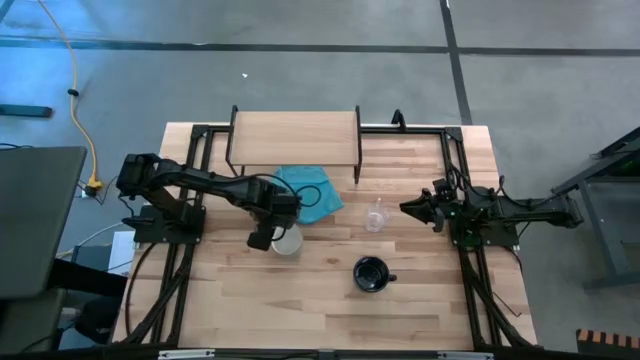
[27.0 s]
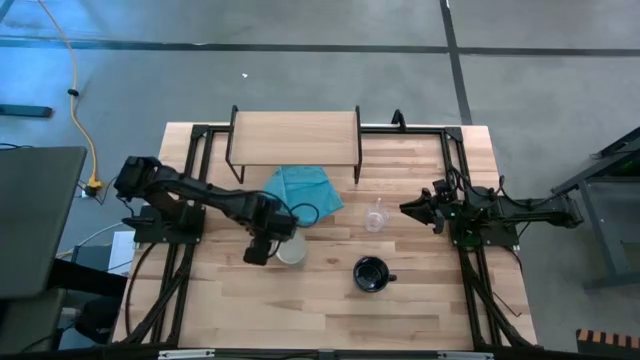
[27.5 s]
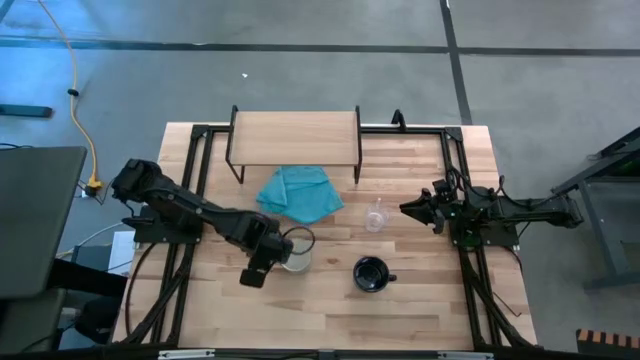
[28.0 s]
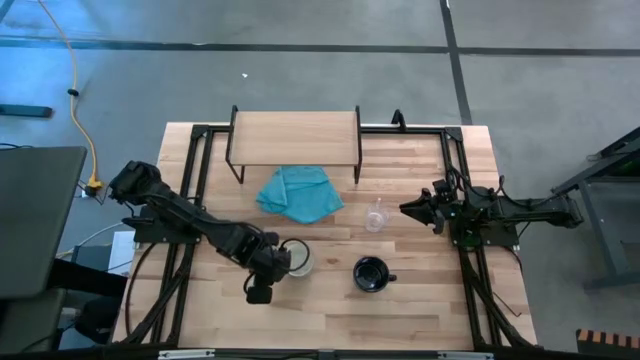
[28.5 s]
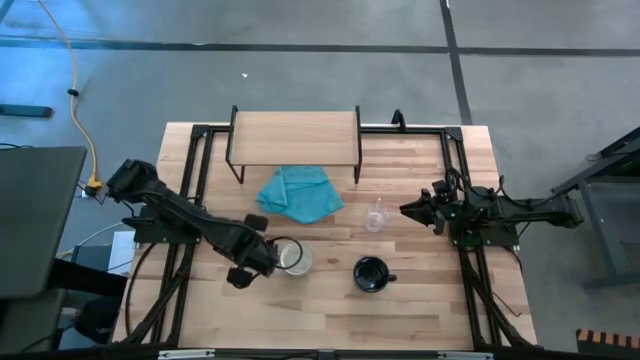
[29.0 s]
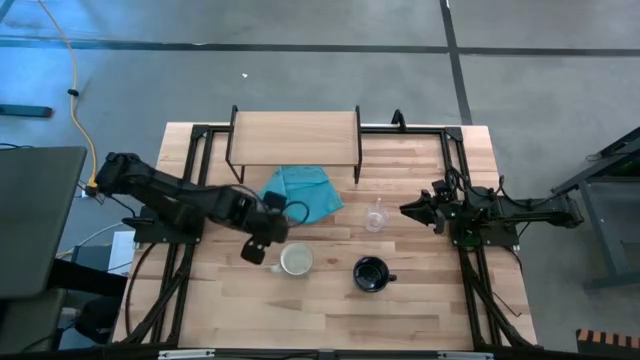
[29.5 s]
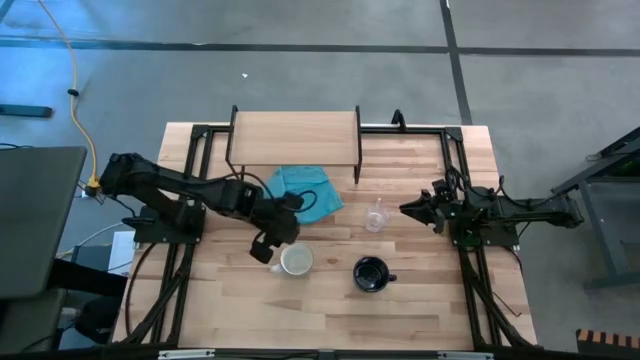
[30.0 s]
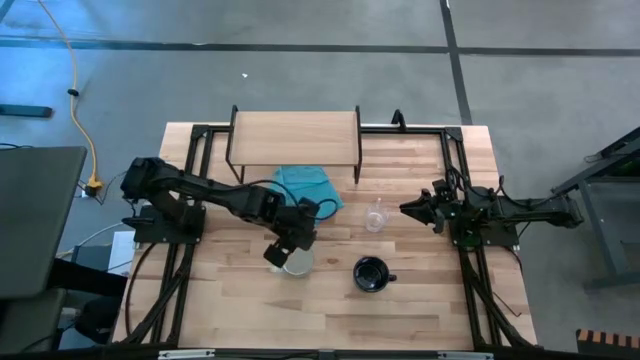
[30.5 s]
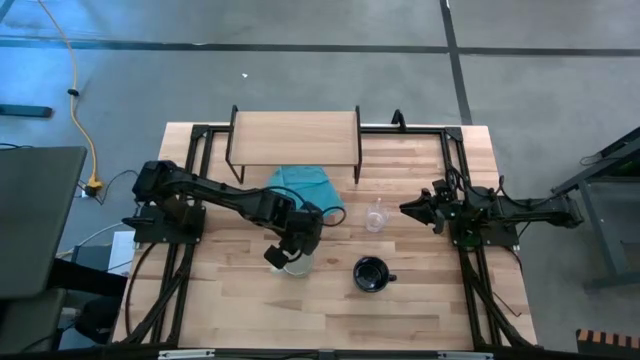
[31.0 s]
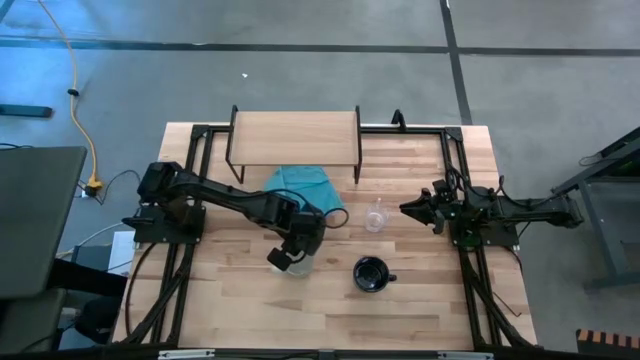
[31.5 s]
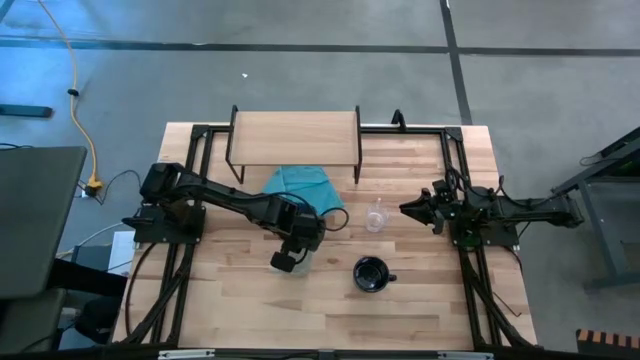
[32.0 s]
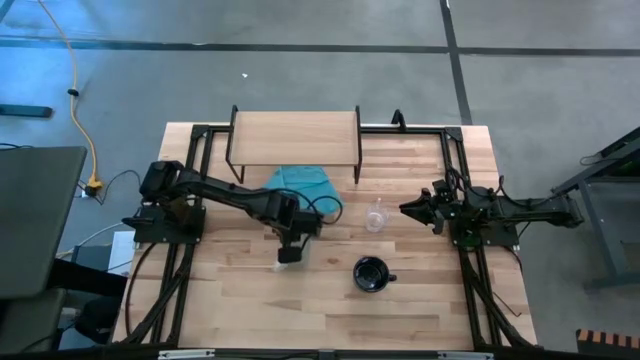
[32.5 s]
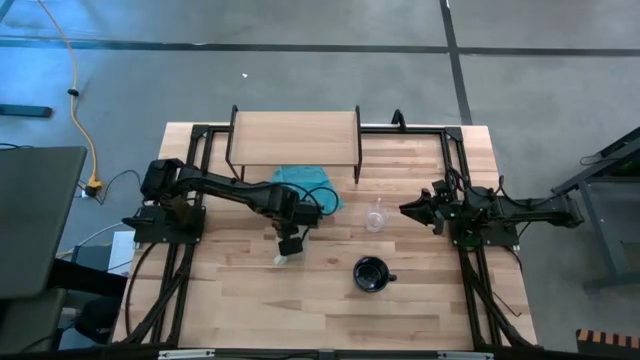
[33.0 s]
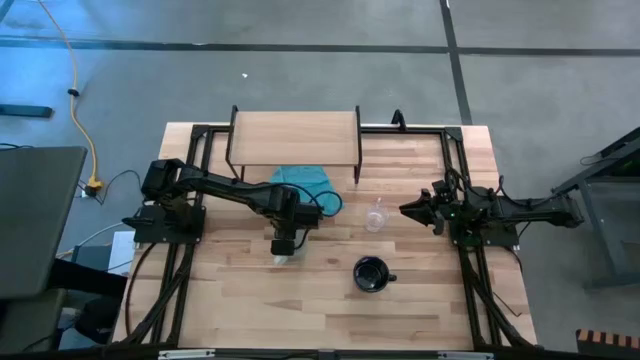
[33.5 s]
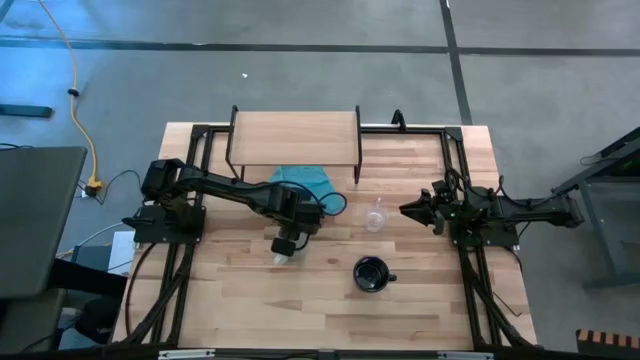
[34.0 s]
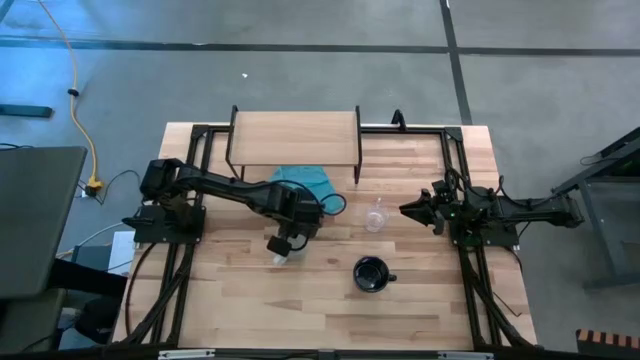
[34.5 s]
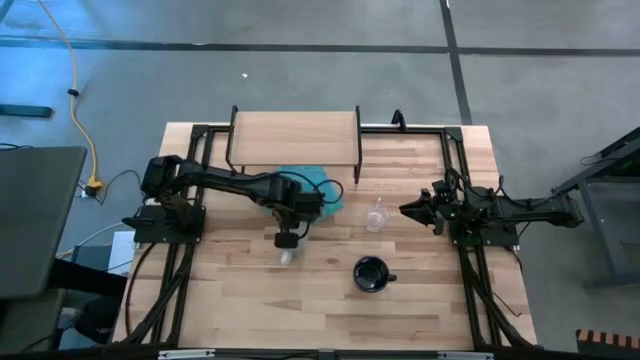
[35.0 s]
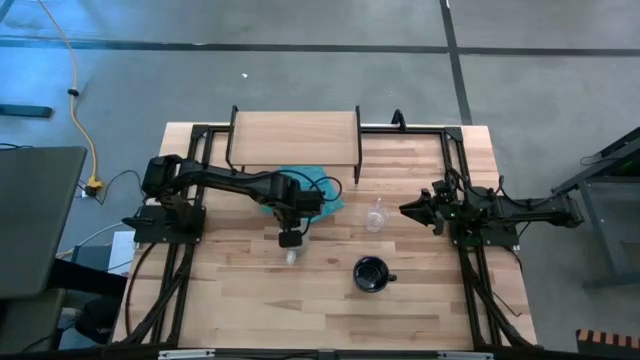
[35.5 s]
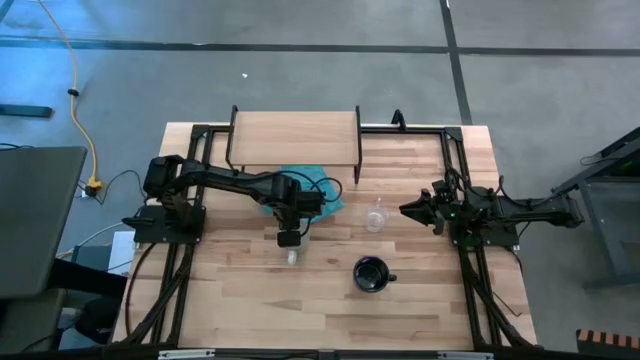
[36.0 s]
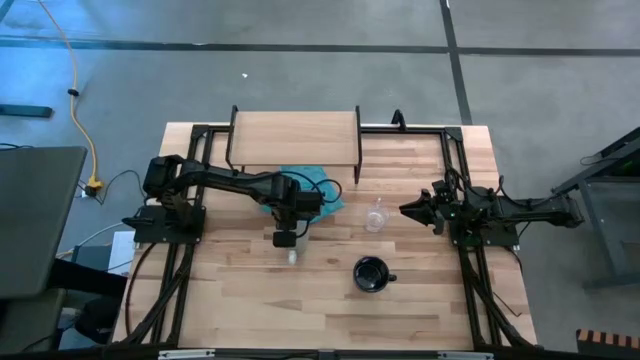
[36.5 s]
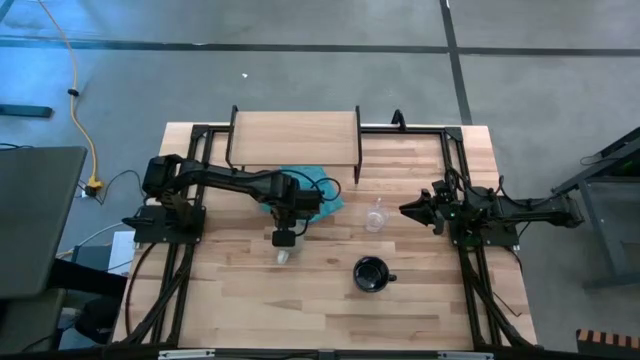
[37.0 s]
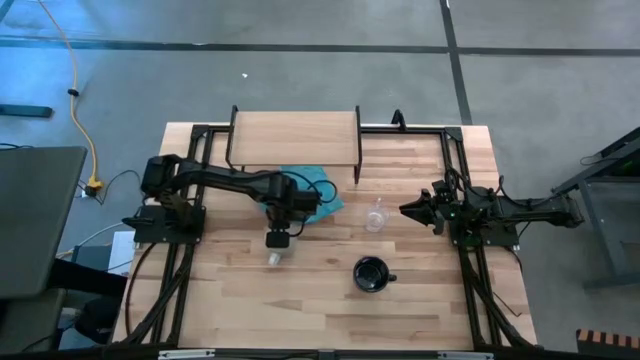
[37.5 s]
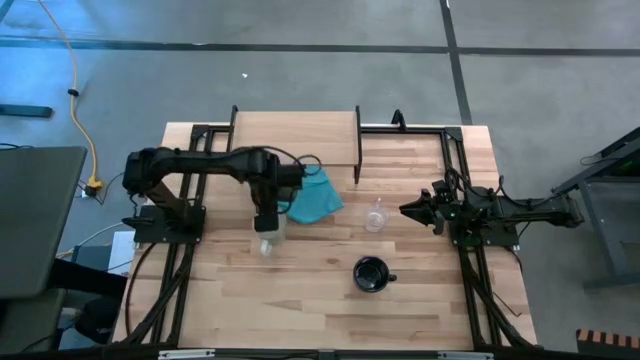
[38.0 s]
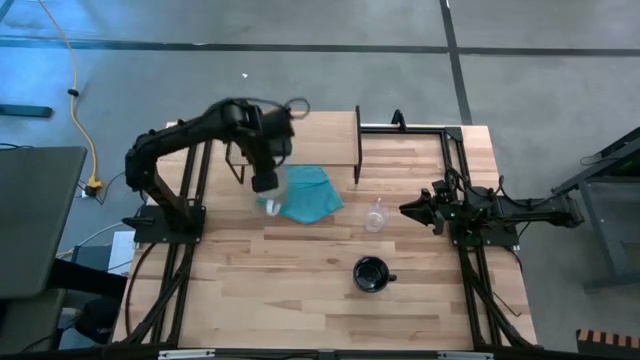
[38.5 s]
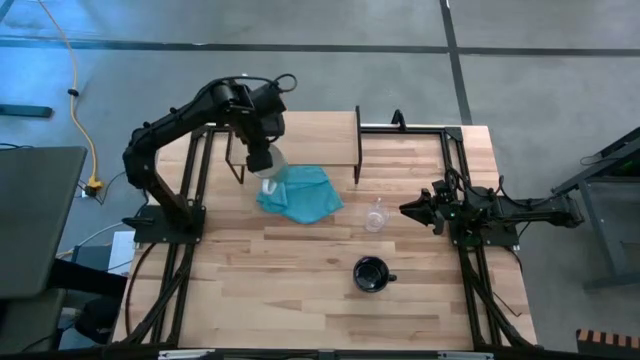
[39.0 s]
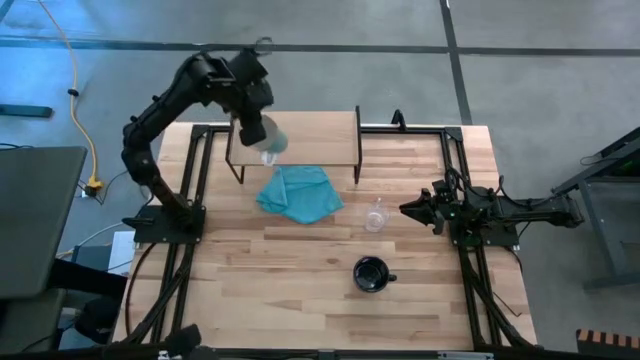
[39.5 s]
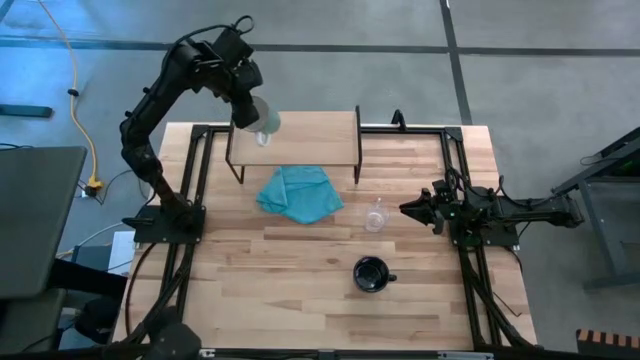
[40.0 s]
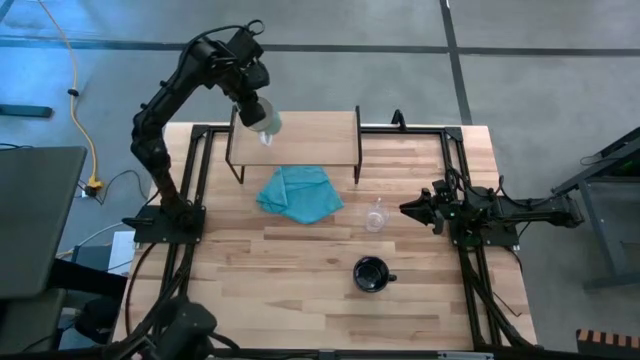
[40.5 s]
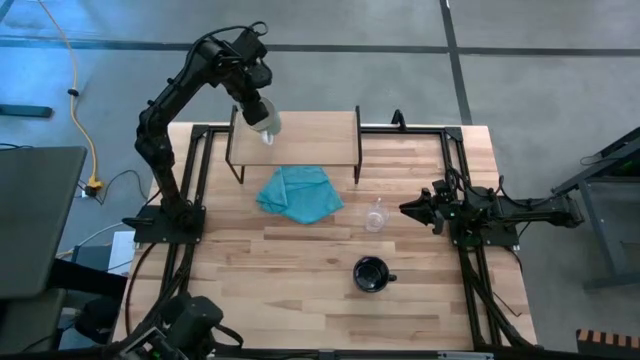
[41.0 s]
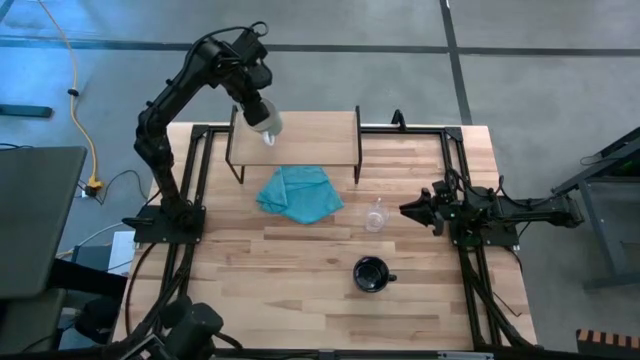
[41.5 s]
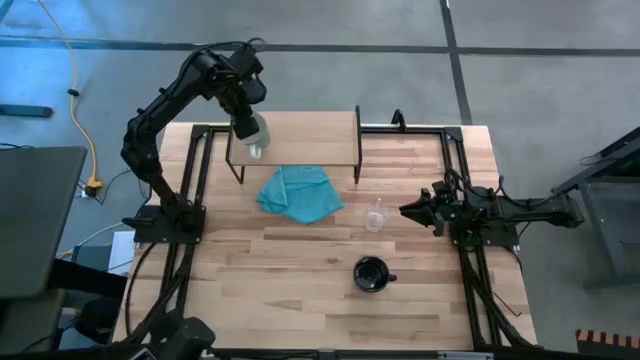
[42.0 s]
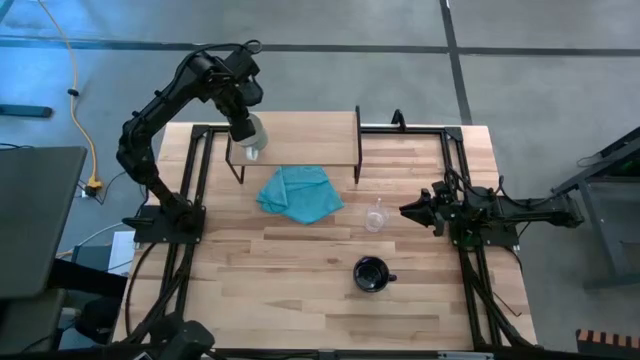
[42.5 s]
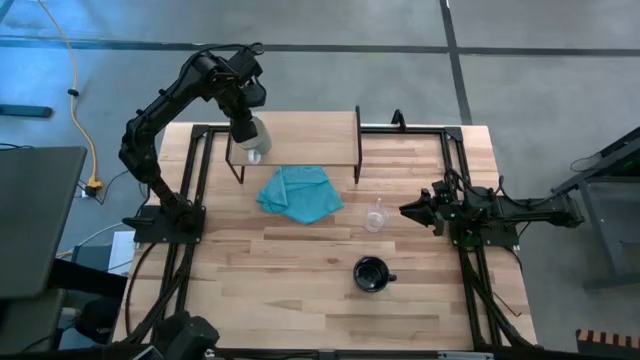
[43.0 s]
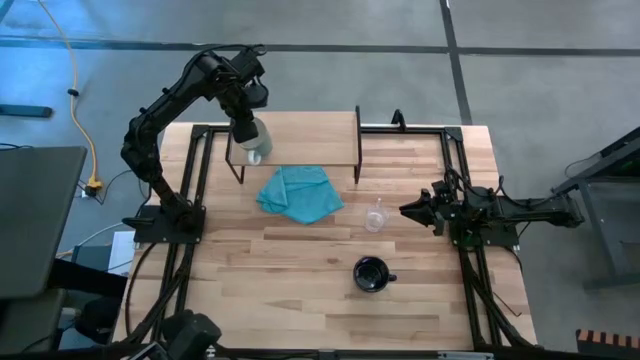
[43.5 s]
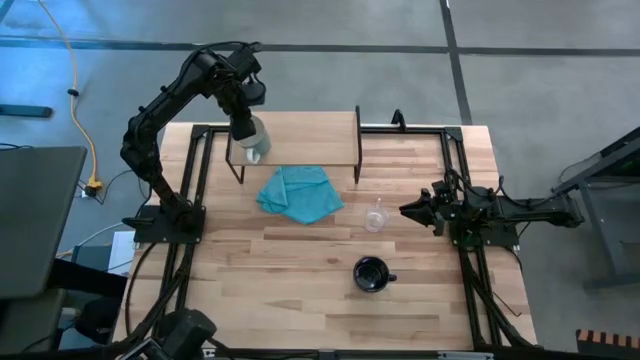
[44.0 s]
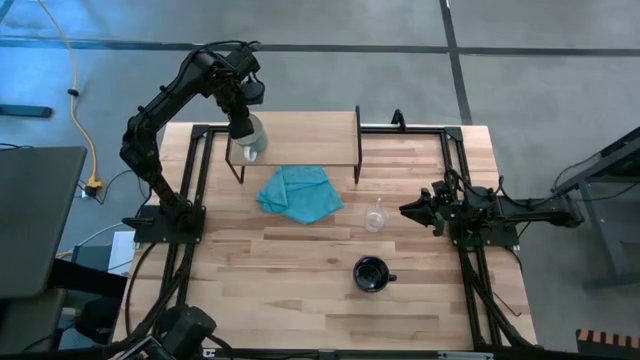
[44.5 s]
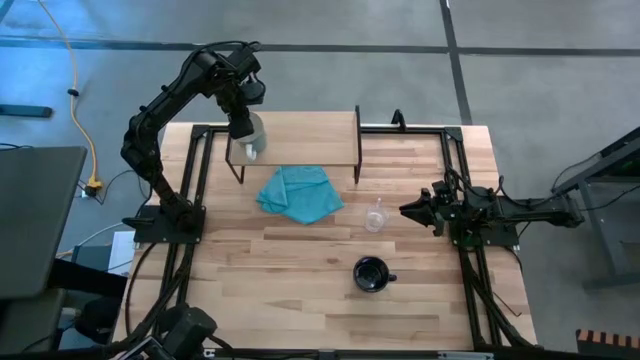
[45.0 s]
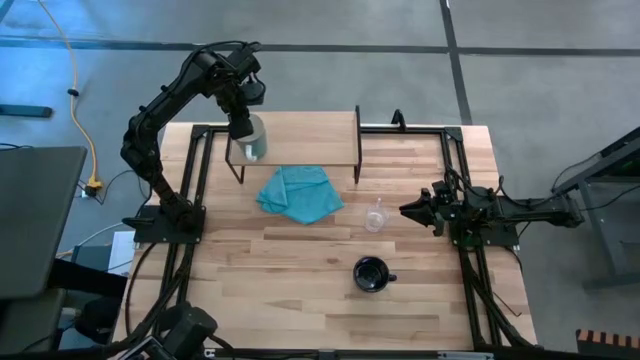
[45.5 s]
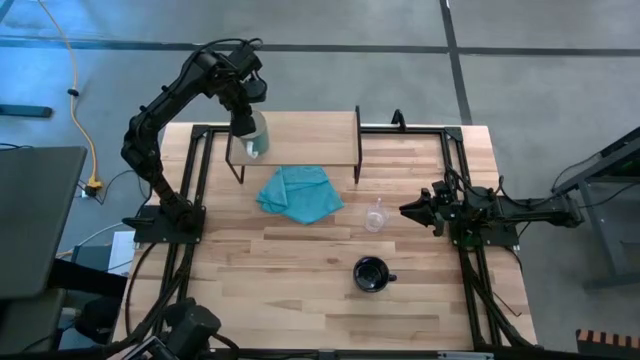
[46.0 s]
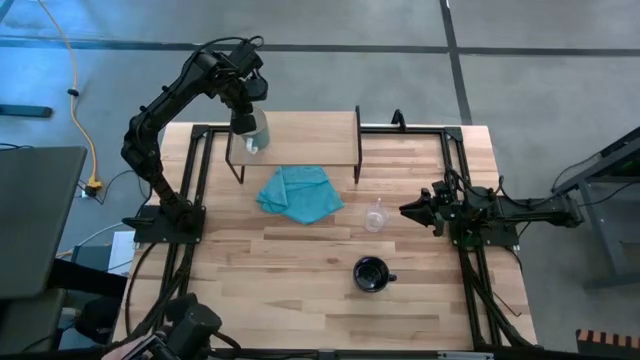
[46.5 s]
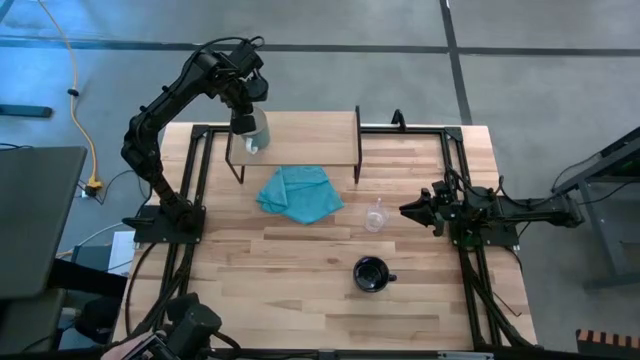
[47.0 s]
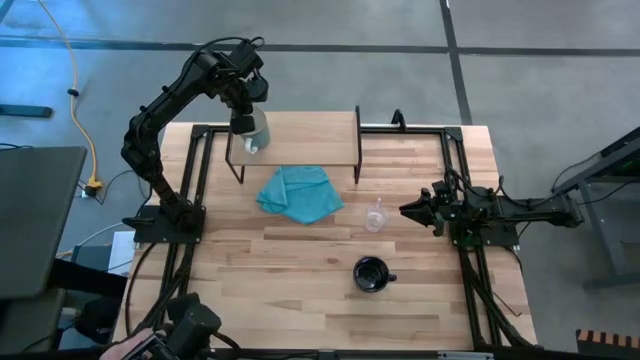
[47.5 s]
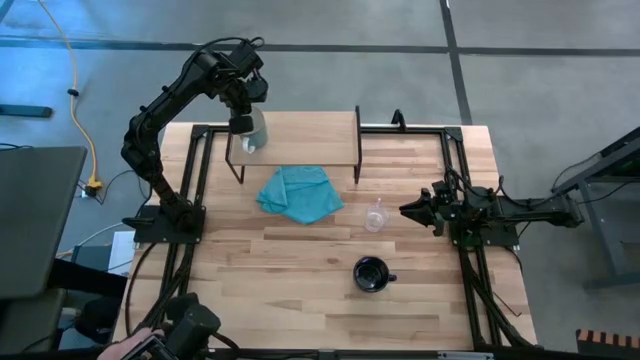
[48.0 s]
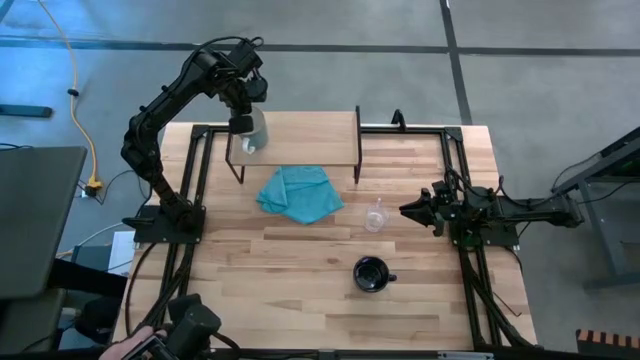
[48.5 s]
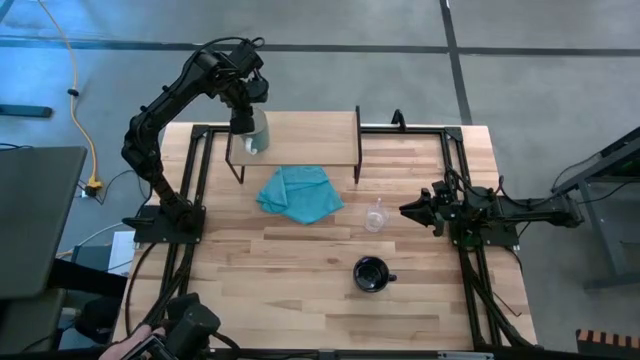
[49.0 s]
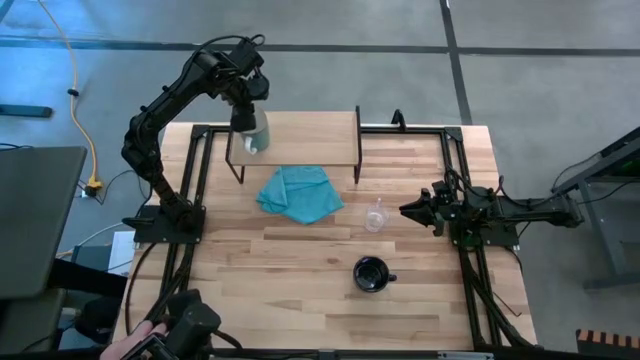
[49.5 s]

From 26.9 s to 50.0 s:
Task: Stack small to large cups/mugs on shelf
Put the light blue mug on the shelf
